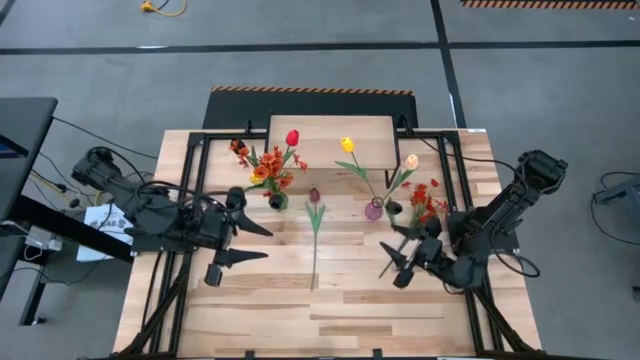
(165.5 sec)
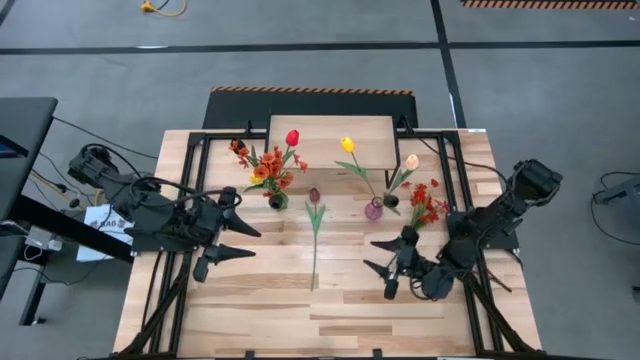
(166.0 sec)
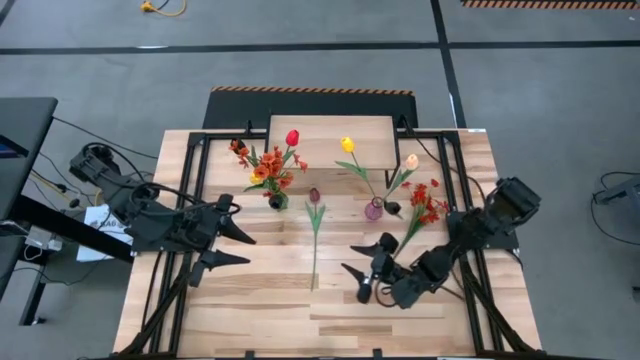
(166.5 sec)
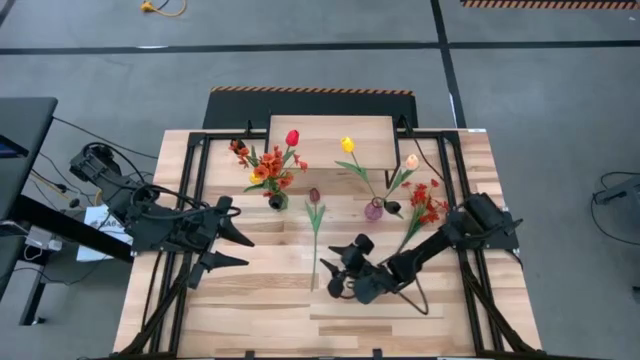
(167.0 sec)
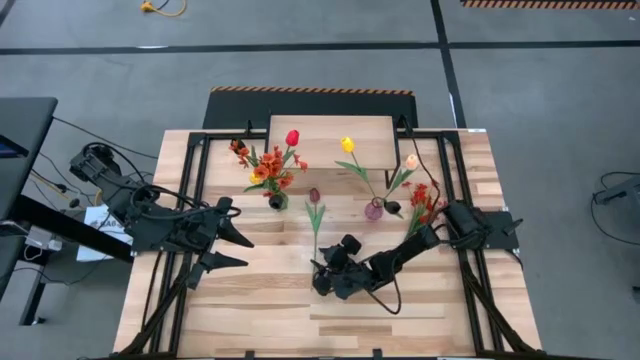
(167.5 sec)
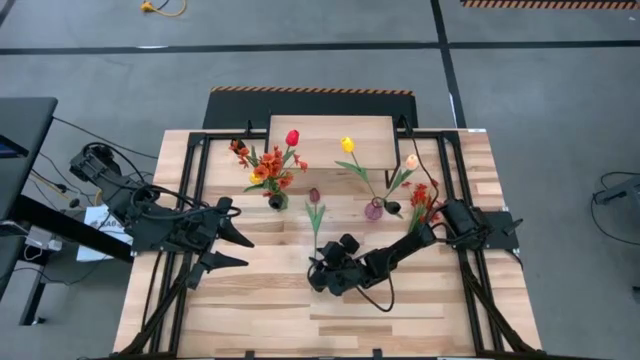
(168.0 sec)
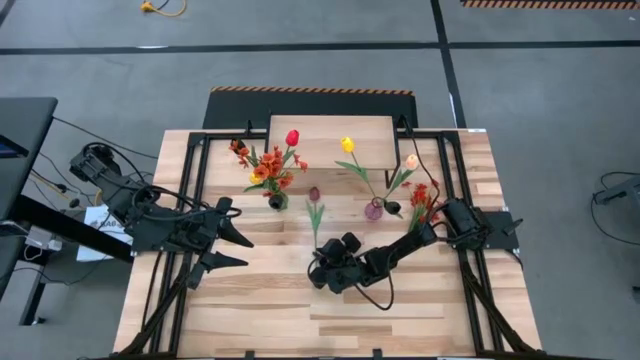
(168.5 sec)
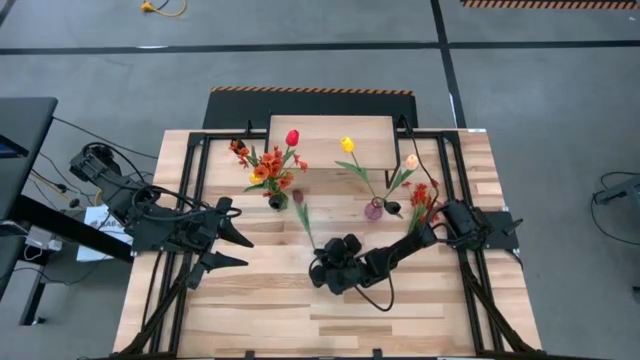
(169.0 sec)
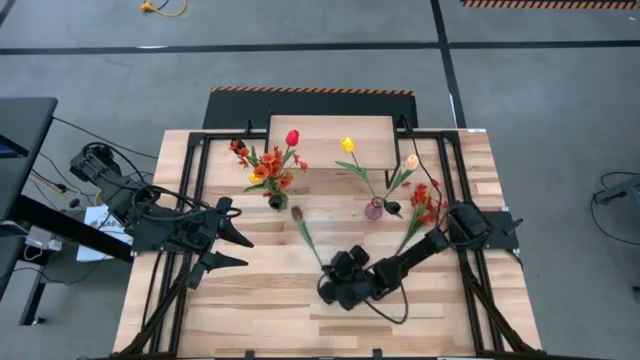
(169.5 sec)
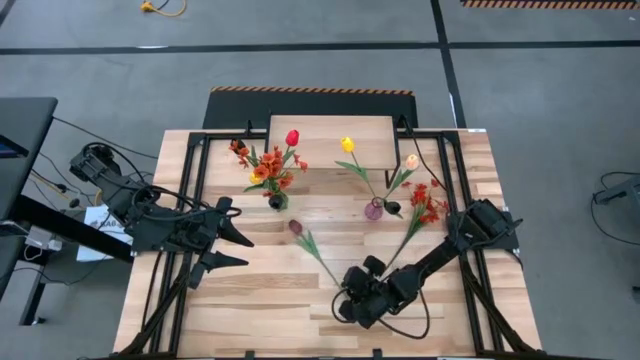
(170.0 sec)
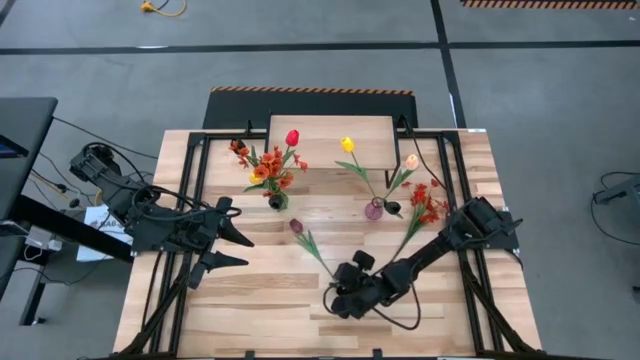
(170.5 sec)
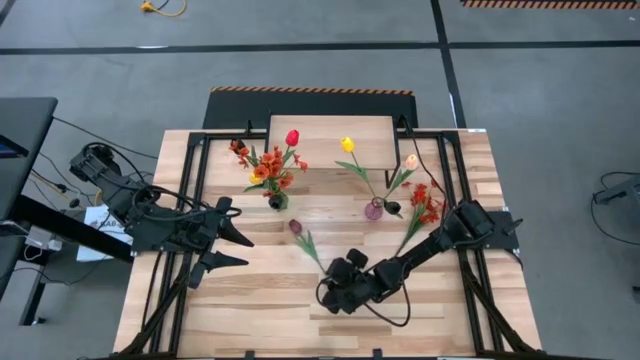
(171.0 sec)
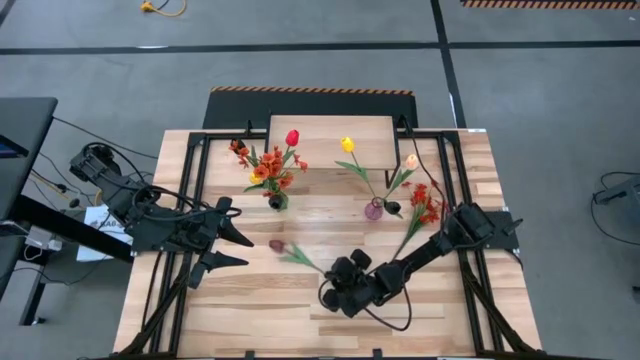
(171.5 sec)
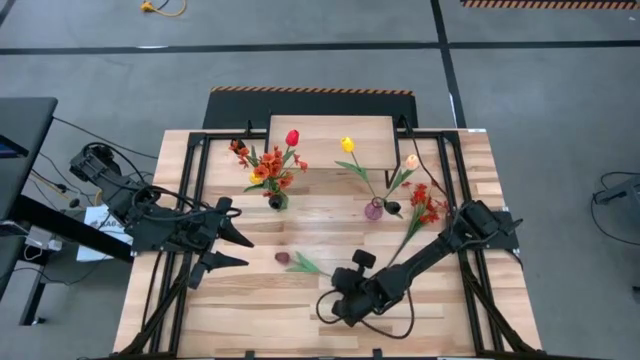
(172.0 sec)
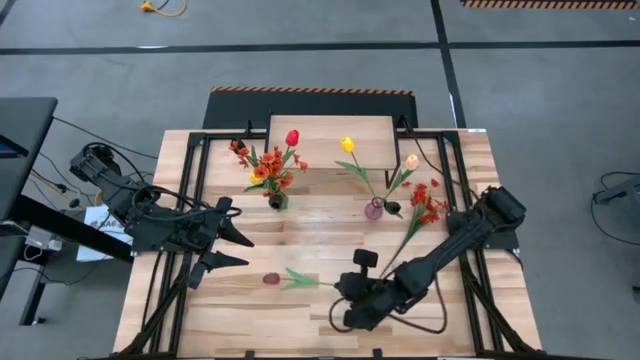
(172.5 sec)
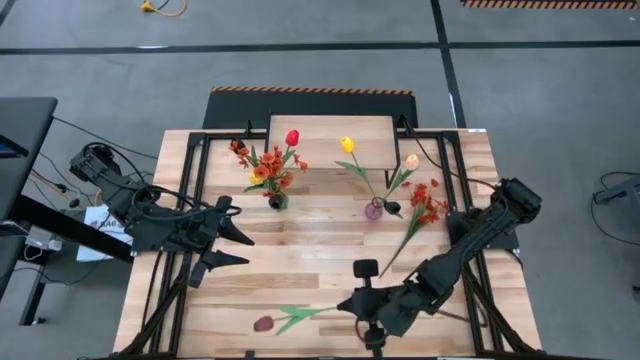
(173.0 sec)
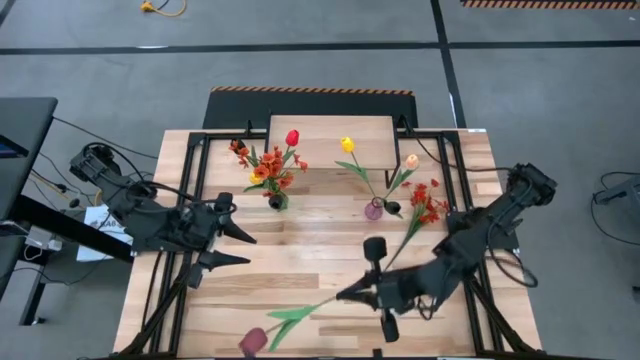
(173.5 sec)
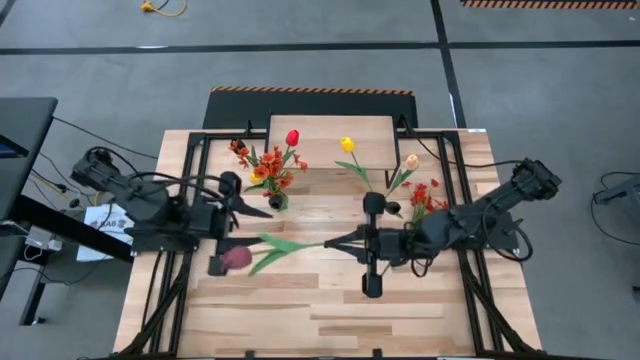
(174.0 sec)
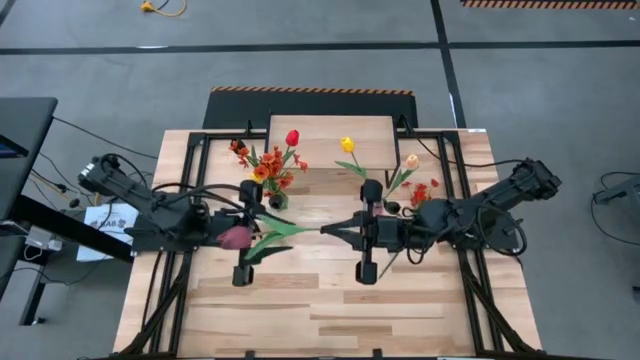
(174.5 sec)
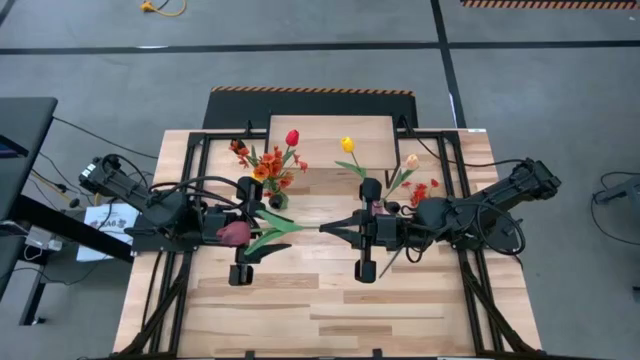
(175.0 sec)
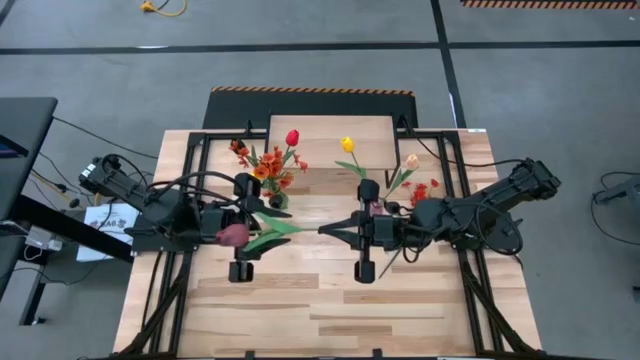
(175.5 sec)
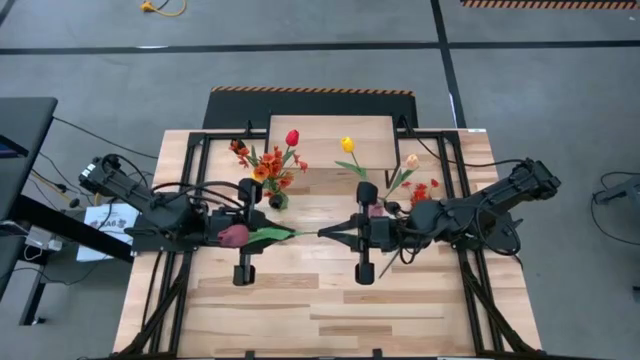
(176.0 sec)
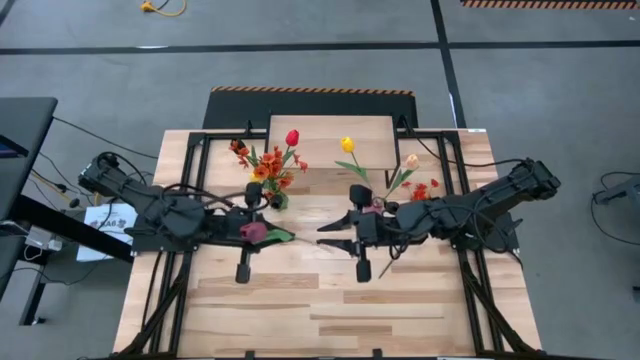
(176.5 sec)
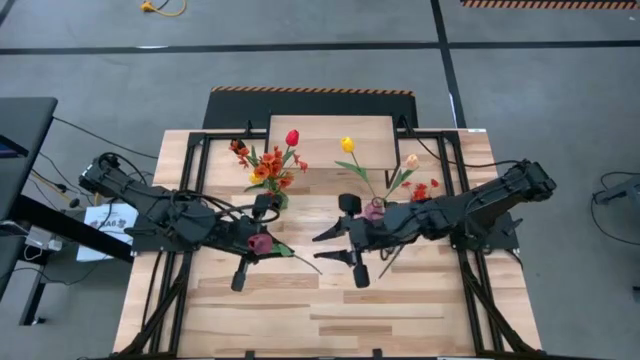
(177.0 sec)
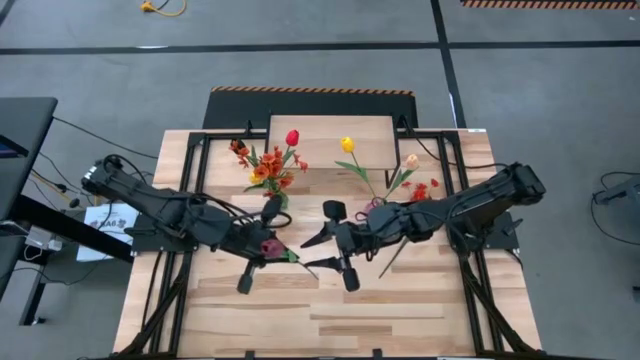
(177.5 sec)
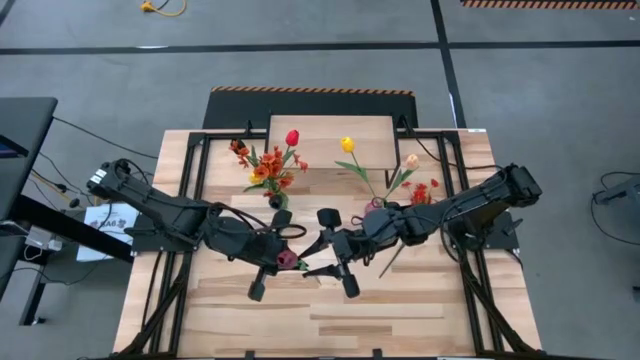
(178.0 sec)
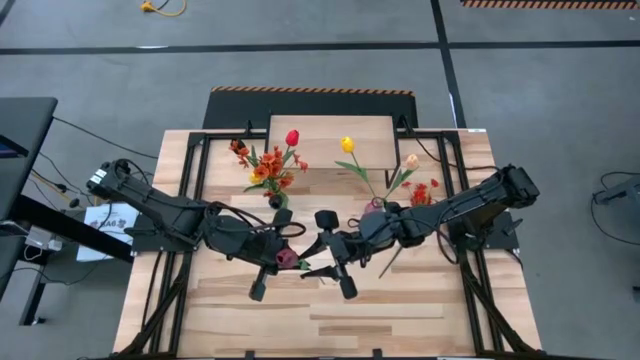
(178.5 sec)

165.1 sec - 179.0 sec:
Task: Pick and place flowers into a vace then onto a shelf
Put the dark red tulip into the purple vase

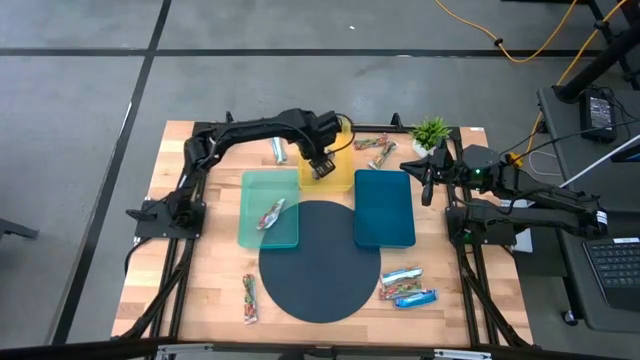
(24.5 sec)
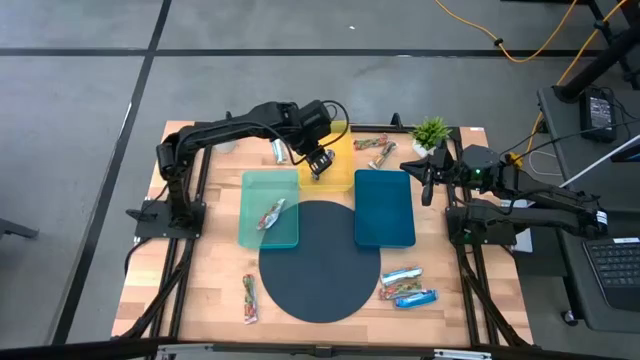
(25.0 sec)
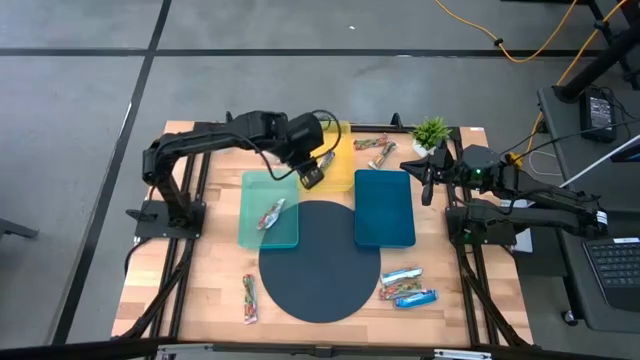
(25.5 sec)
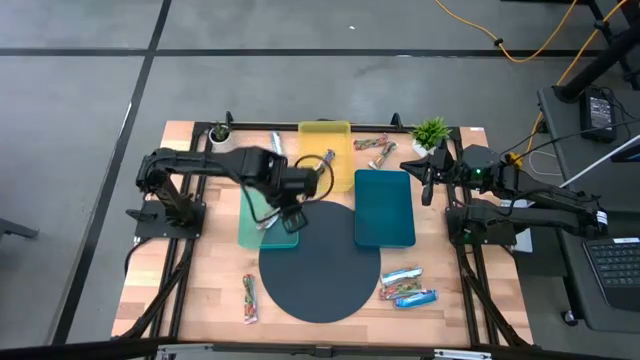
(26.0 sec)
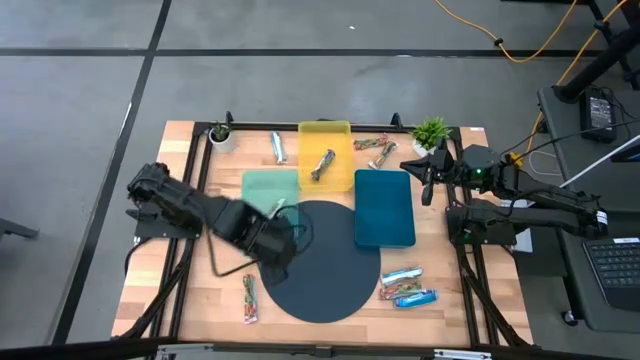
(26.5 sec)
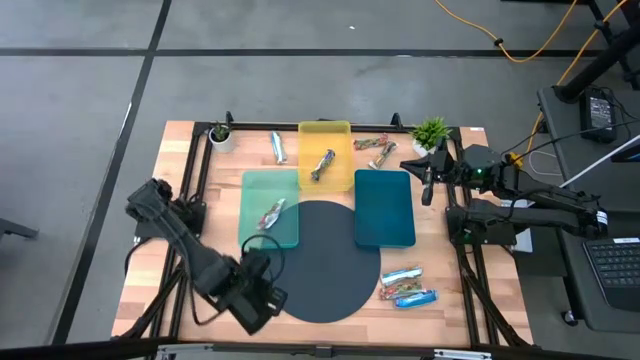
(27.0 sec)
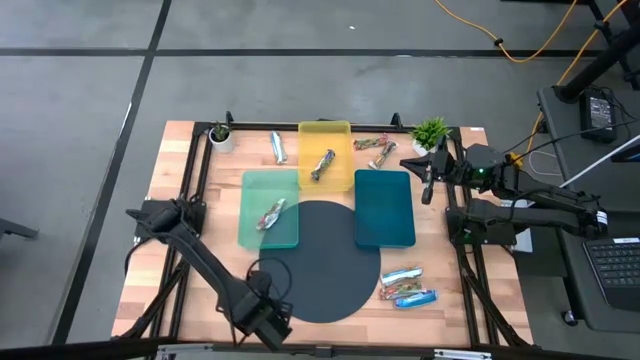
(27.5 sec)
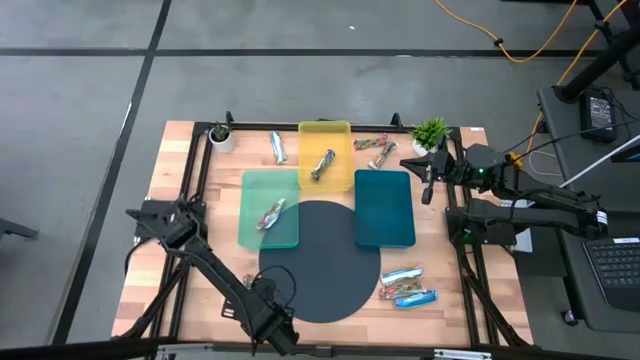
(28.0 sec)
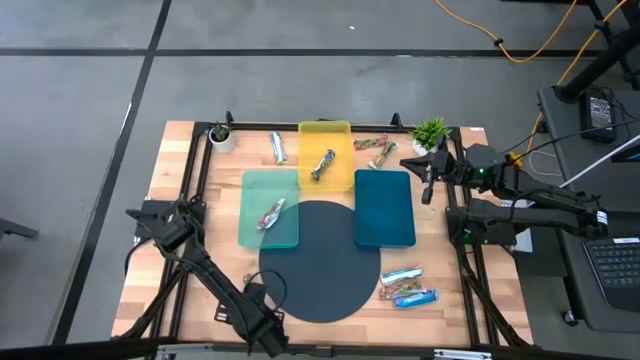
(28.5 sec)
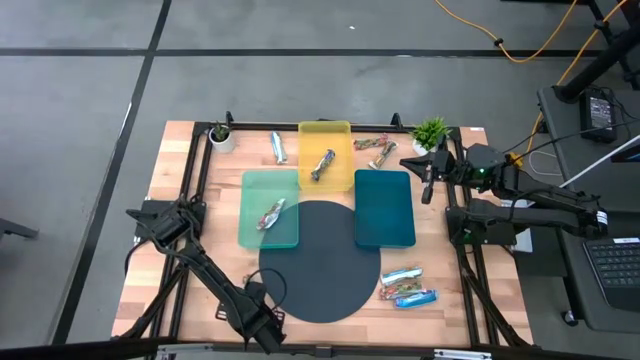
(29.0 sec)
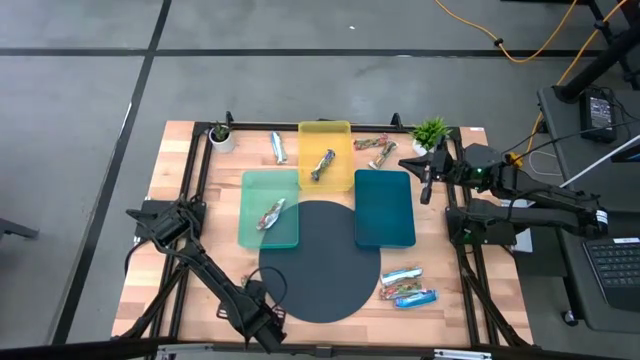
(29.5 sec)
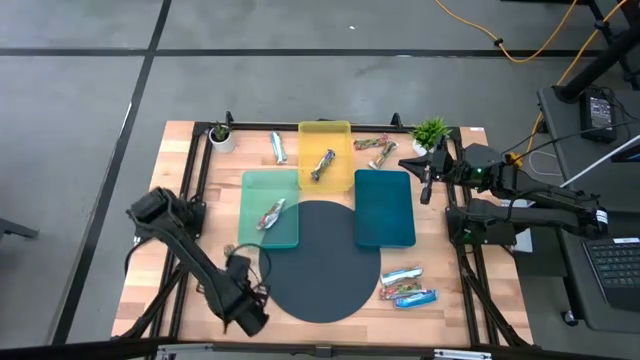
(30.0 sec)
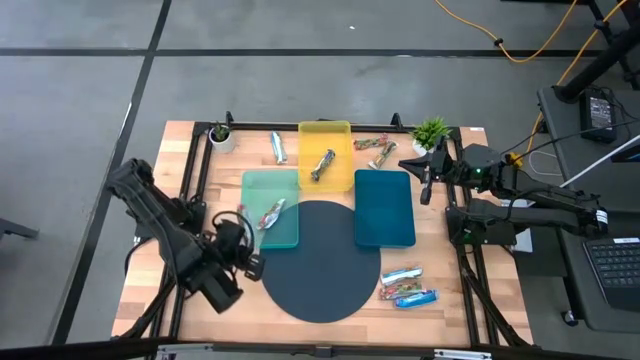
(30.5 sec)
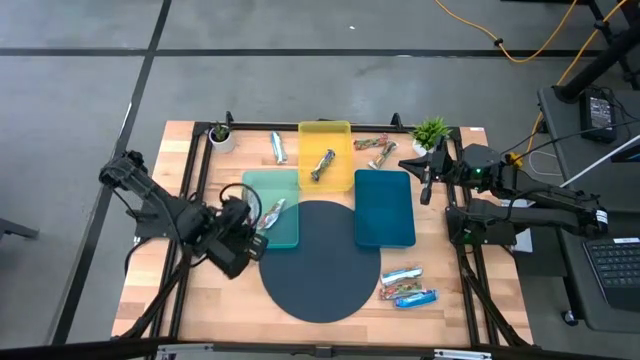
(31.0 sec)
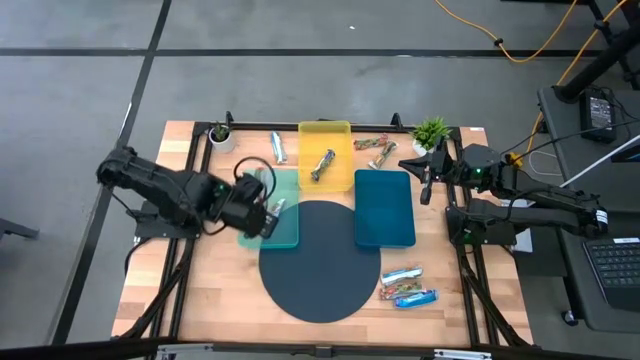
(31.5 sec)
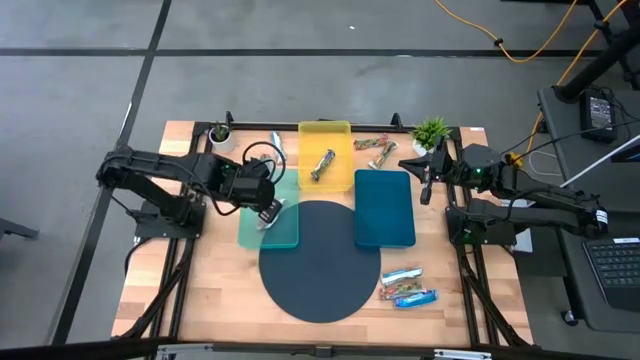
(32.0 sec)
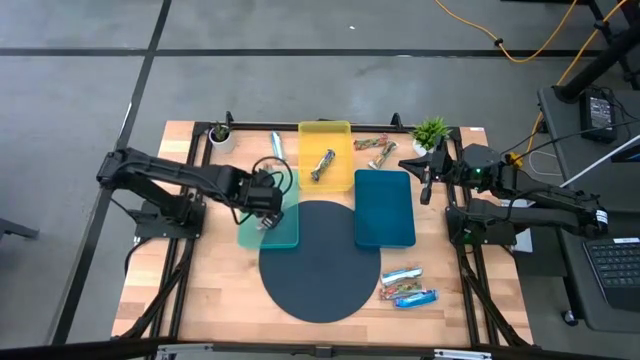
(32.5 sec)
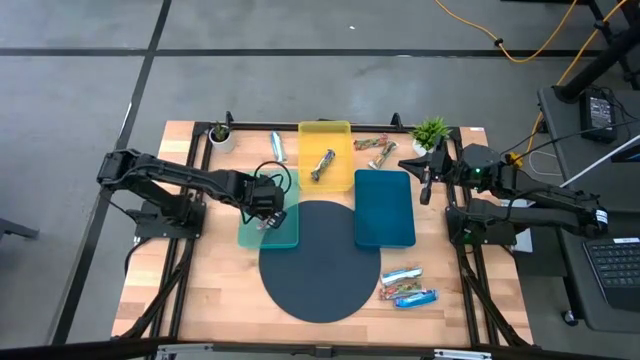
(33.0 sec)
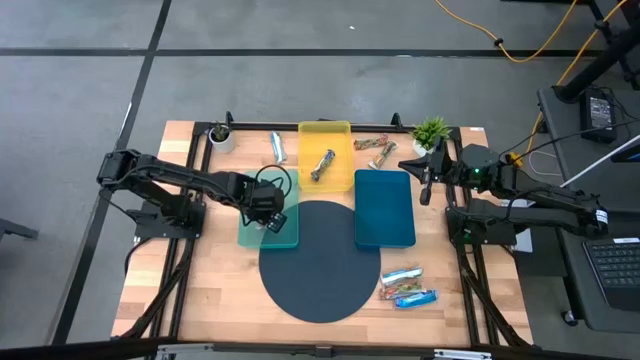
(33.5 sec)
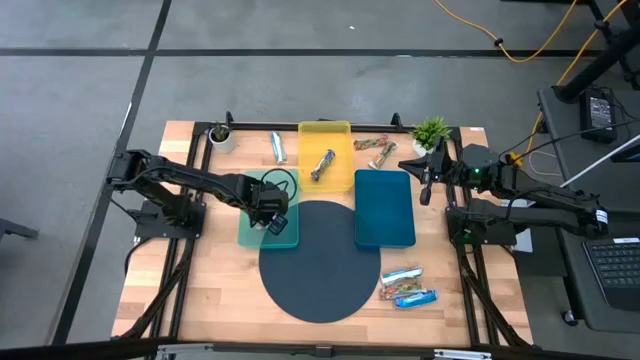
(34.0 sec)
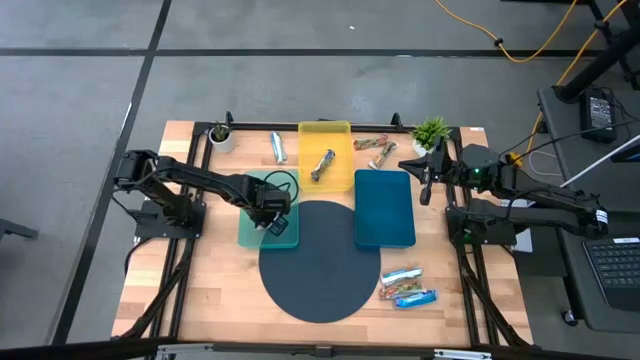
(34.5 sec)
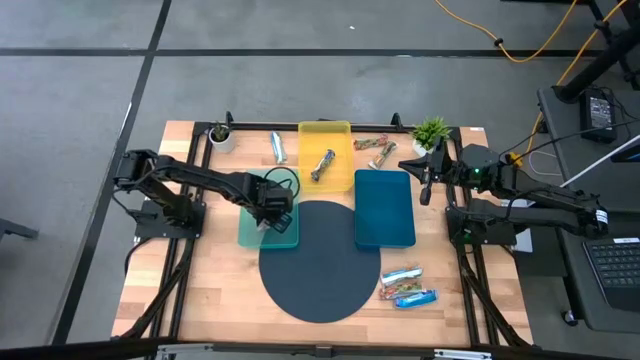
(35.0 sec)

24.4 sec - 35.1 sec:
Task: Pick and place Granola Bars by type
Put the red granola bar into the light blue bin
